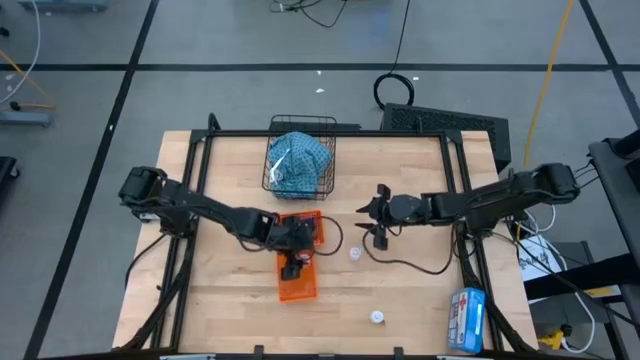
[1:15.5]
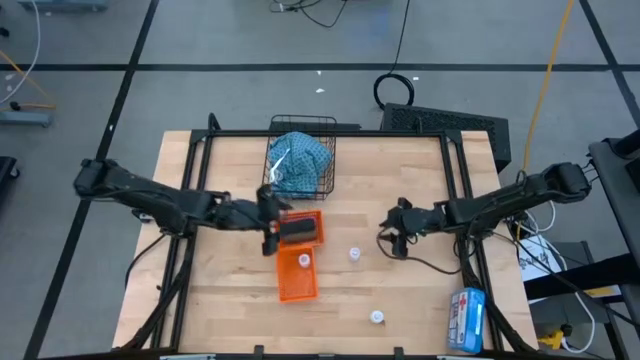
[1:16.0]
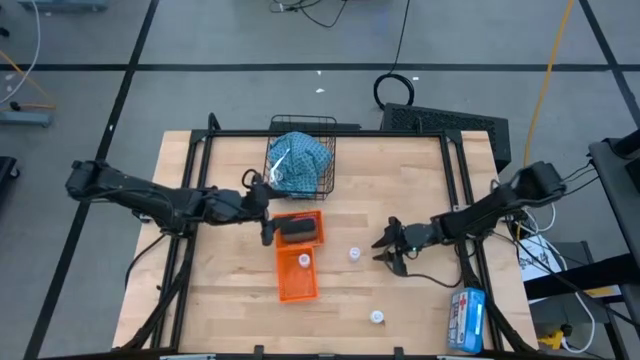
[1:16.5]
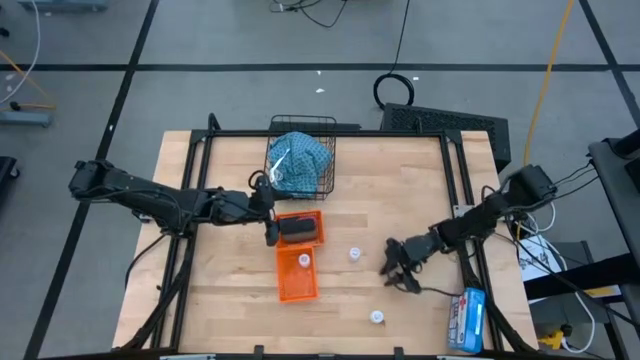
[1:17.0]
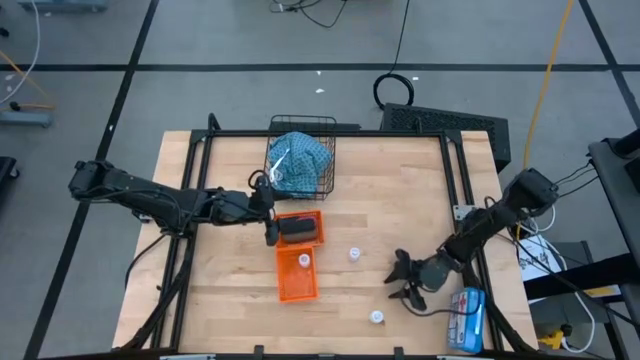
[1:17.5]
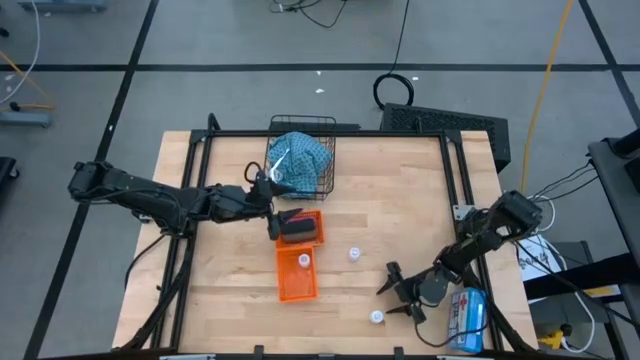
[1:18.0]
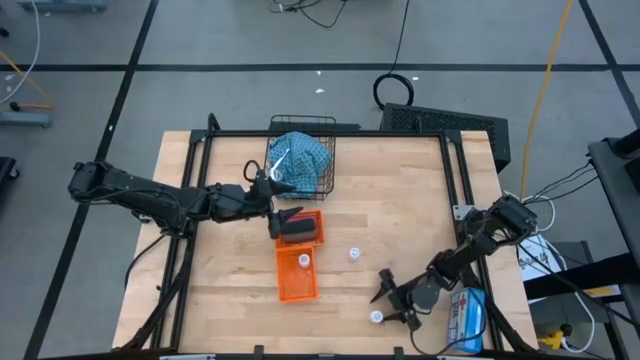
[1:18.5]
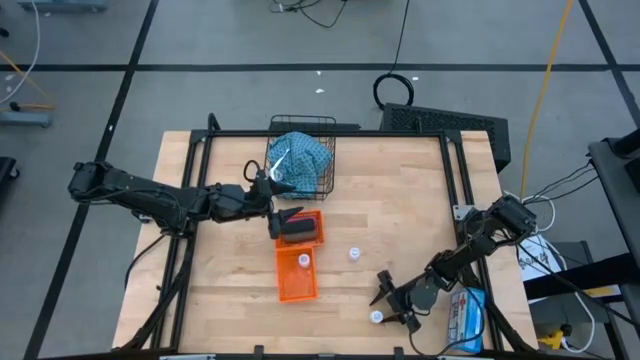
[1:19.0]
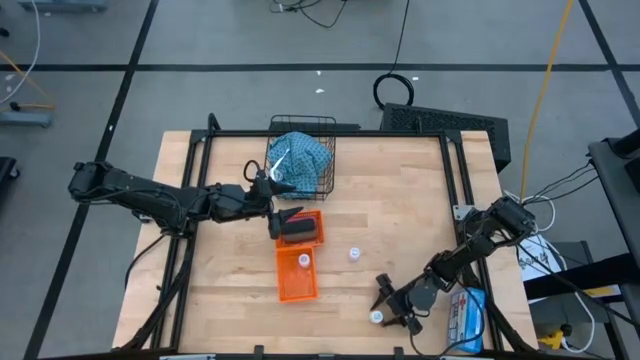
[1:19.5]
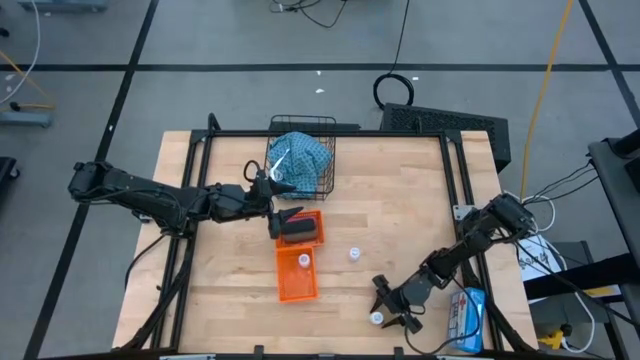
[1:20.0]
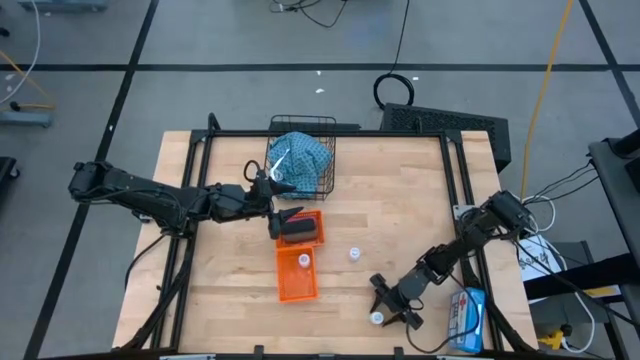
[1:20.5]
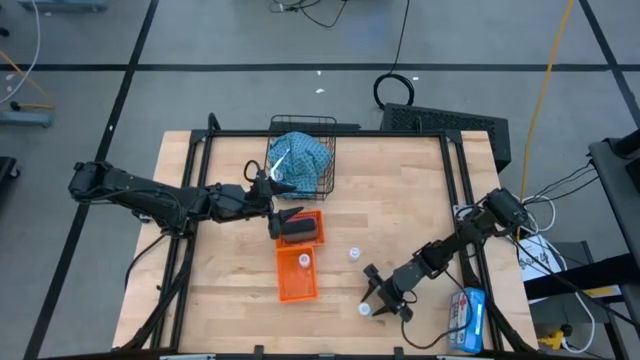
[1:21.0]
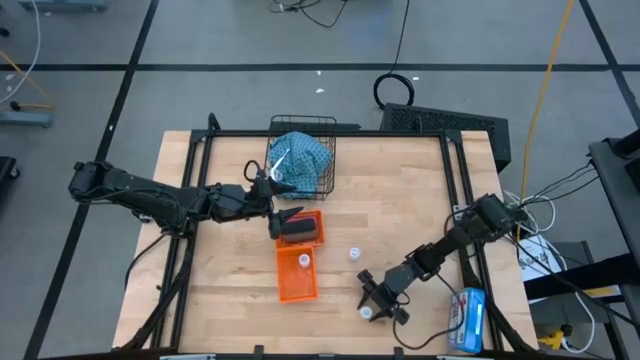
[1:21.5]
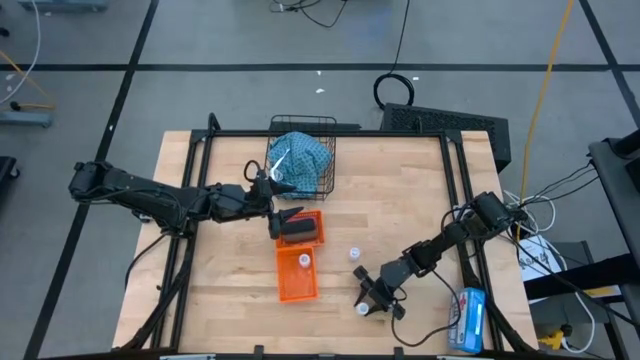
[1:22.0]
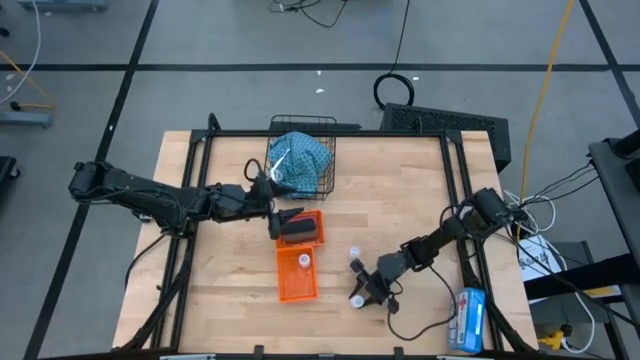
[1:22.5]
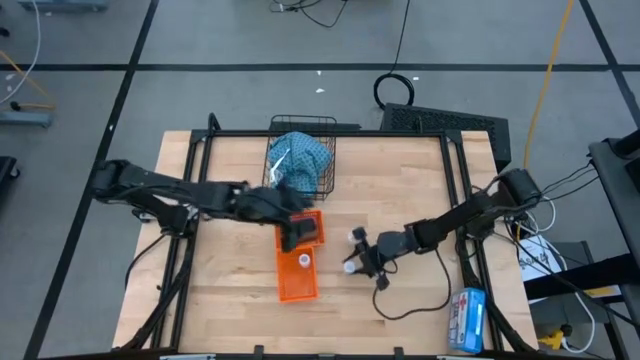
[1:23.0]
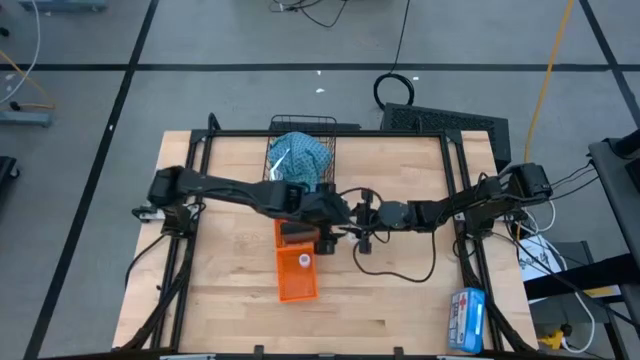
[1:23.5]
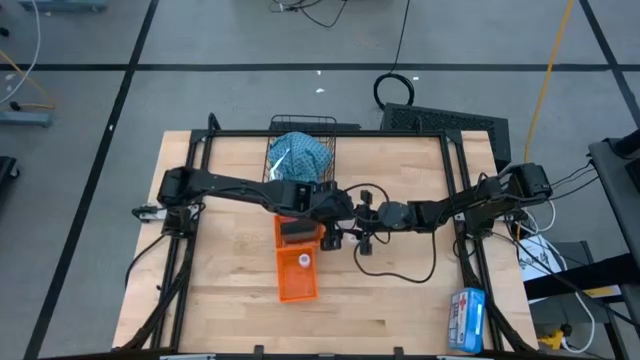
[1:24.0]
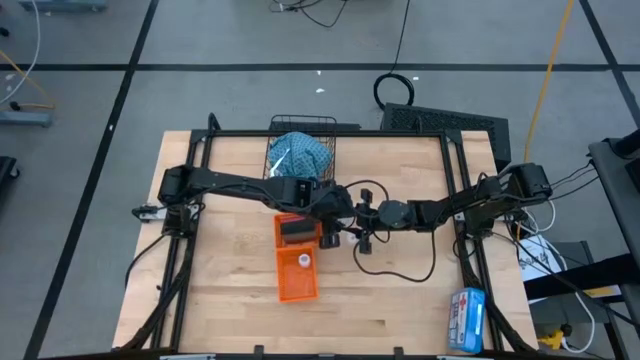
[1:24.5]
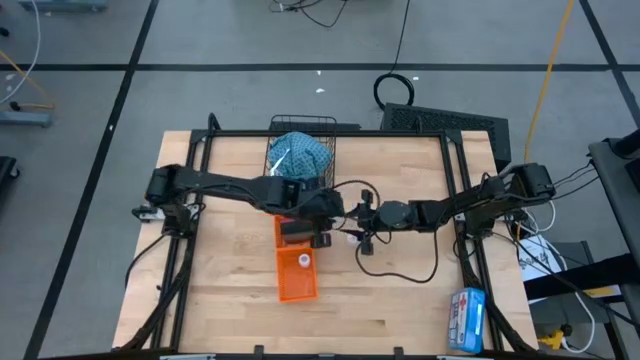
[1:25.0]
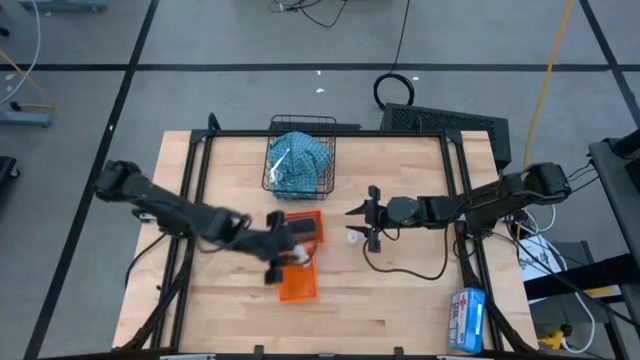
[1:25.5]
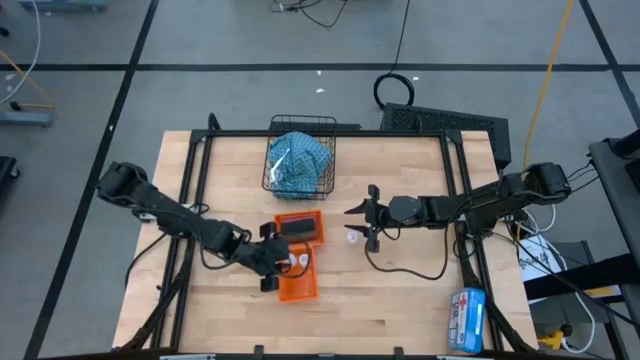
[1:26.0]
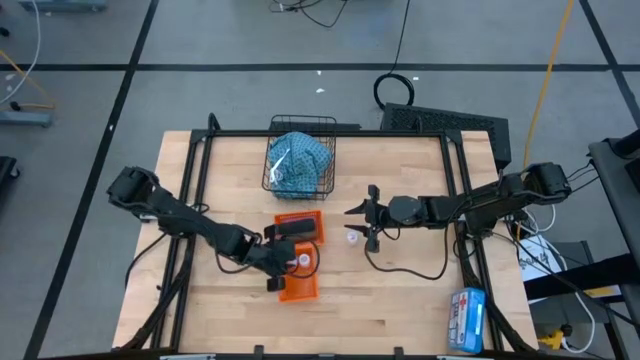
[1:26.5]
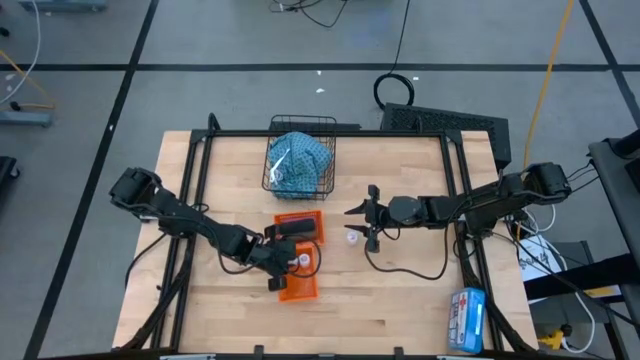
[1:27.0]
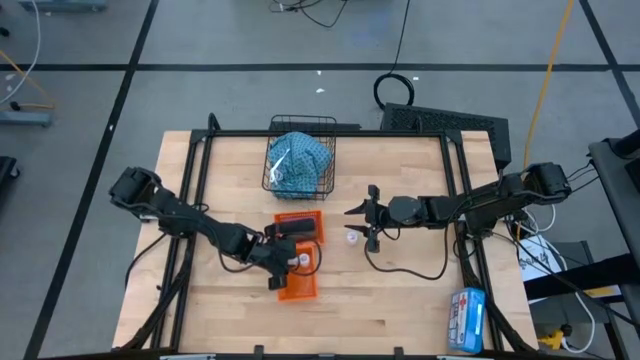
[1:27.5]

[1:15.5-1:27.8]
Task: Pick & Place Medicine items
Put the bottom white medicine bottle into the bottom orange bin

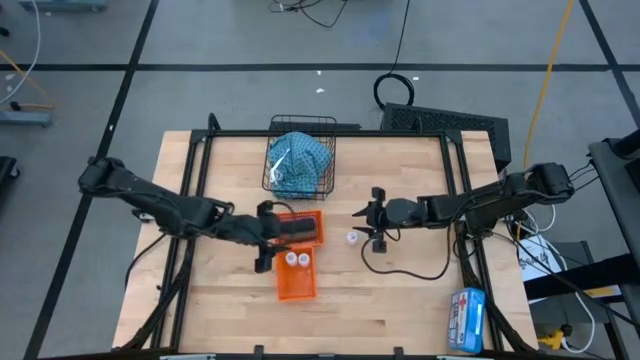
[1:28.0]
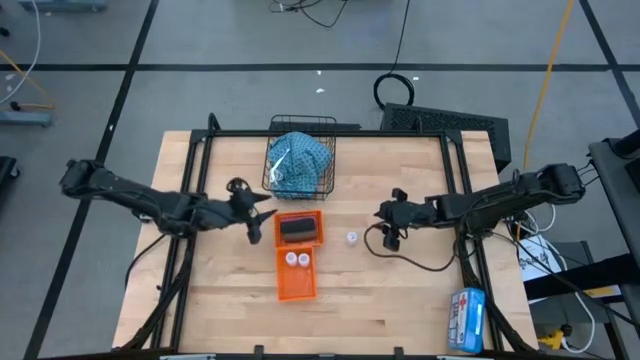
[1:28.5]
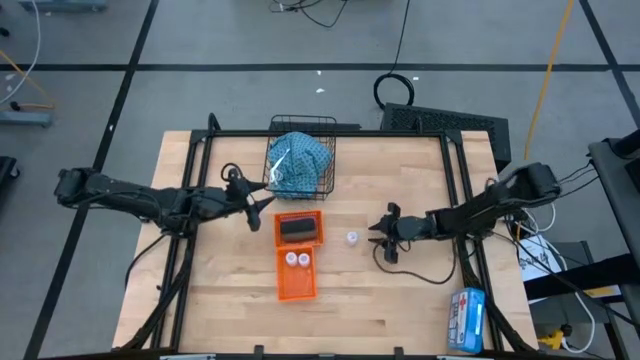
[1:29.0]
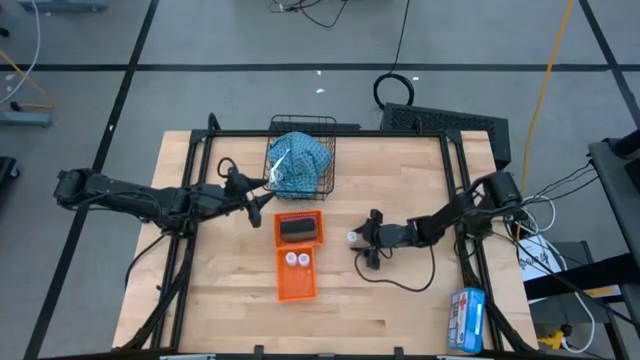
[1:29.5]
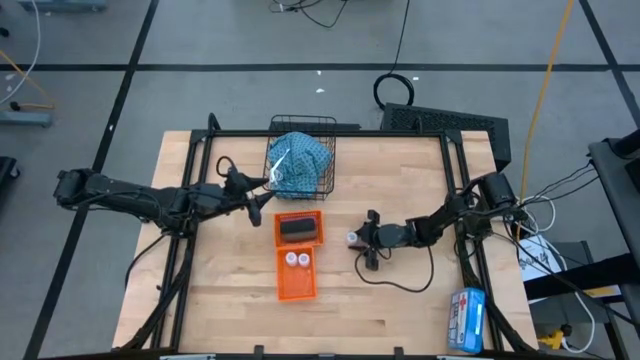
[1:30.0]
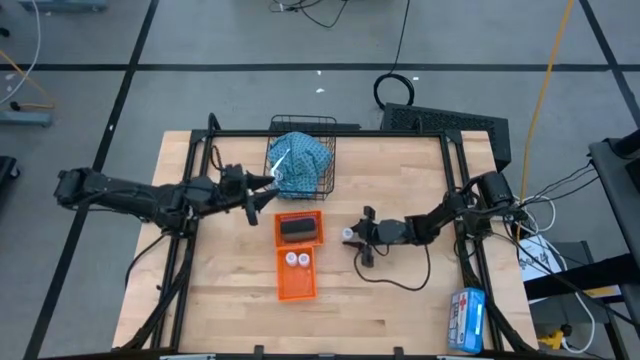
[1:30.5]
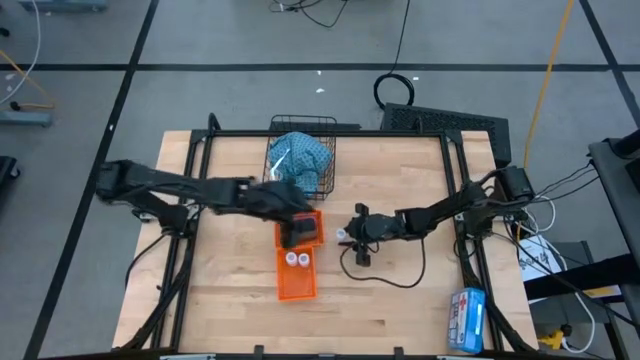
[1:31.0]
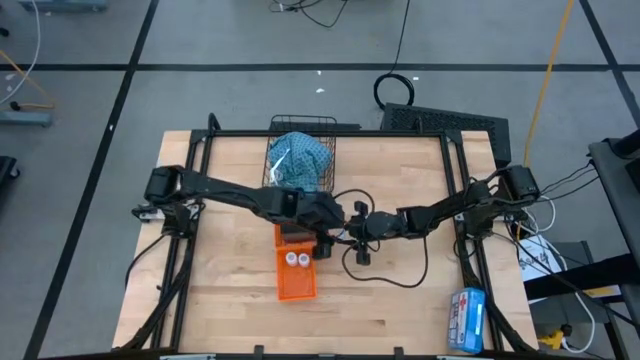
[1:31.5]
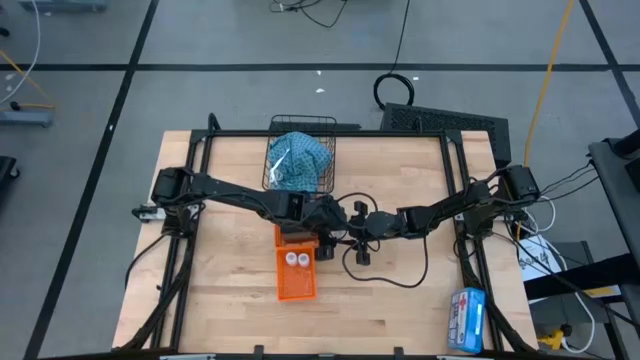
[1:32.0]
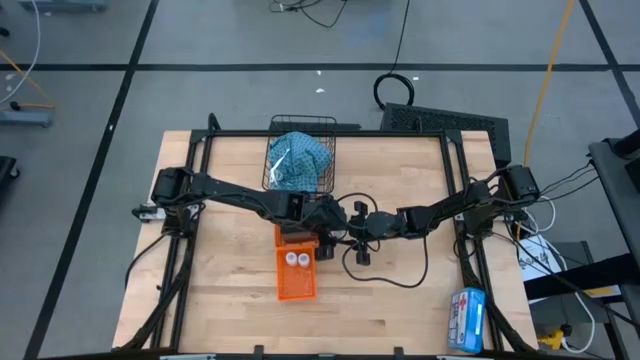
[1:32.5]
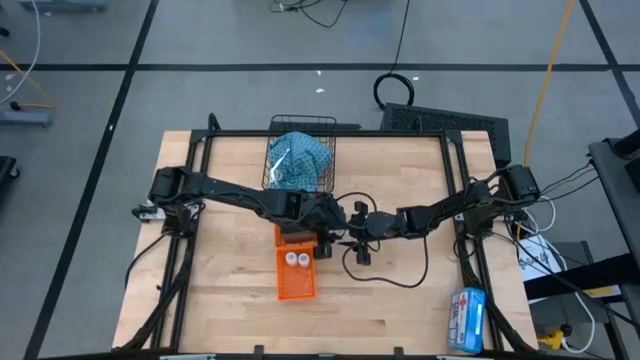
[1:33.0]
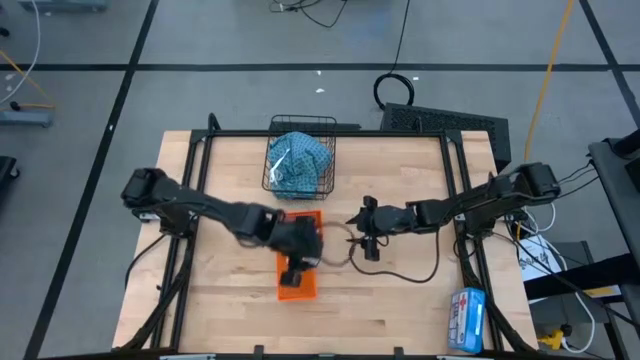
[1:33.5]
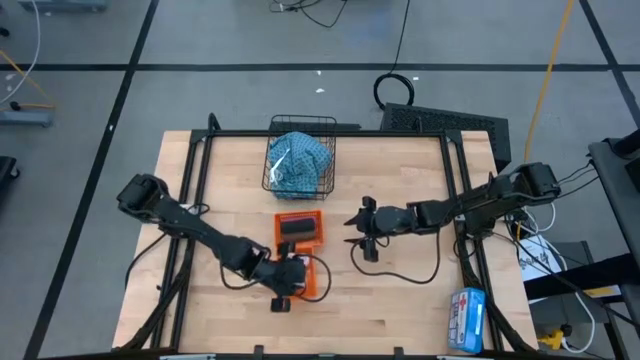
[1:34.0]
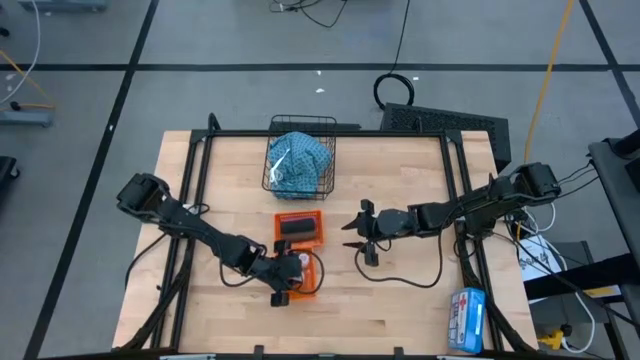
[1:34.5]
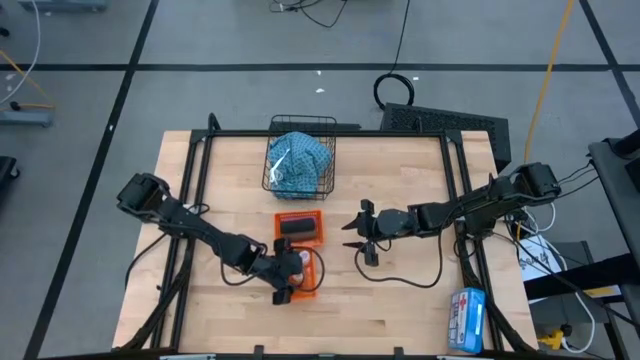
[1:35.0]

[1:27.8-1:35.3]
Put the white medicine bottle into the bottom orange bin

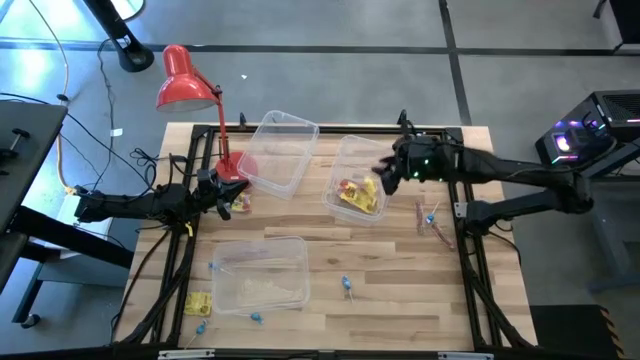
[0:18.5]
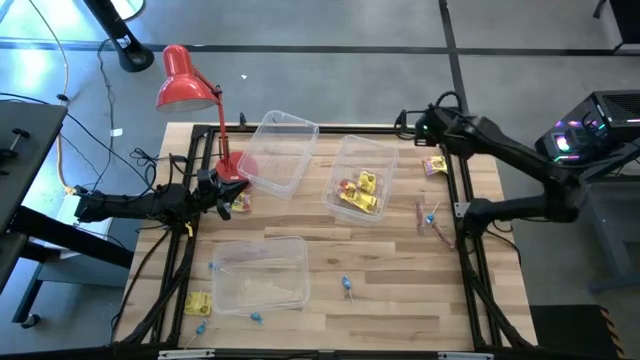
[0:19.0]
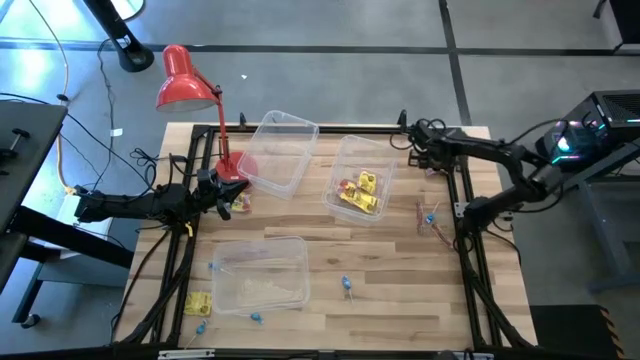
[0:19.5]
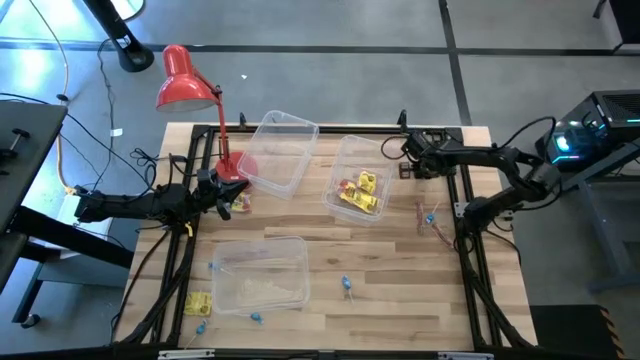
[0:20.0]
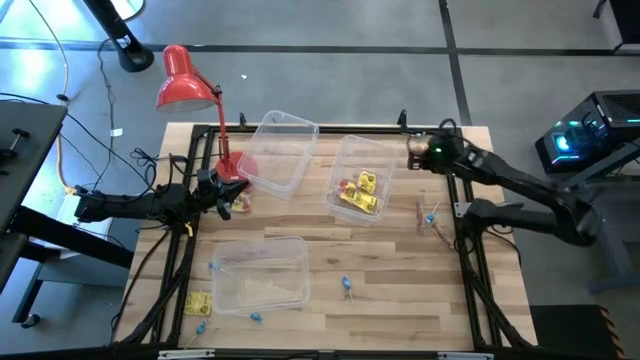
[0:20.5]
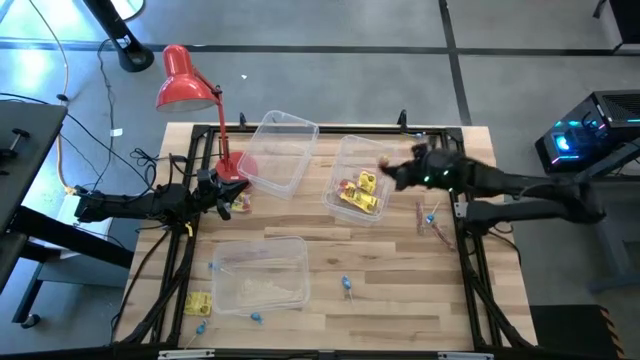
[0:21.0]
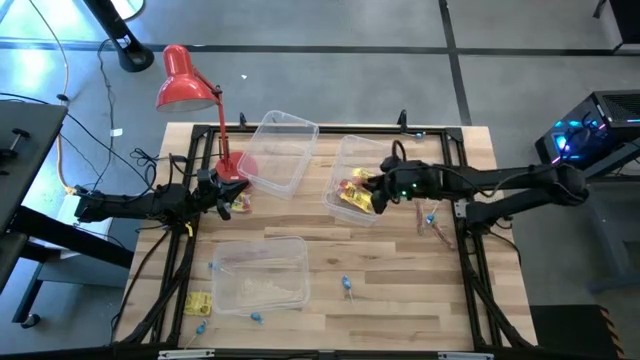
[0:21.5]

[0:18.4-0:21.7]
Task: Sort candy
Put the yellow candy into the top right transparent bin
